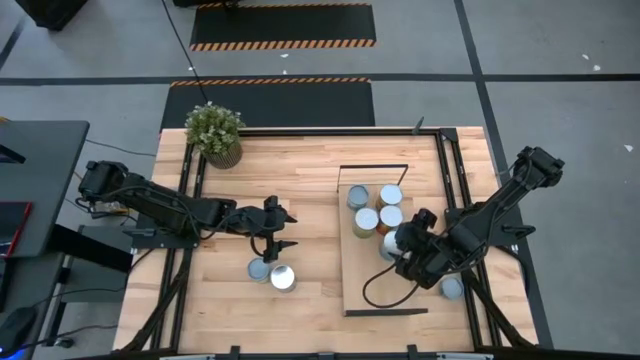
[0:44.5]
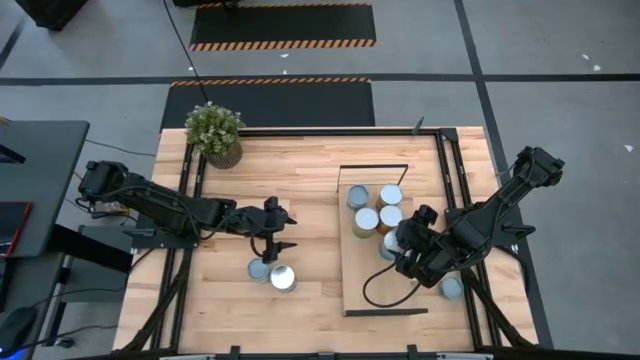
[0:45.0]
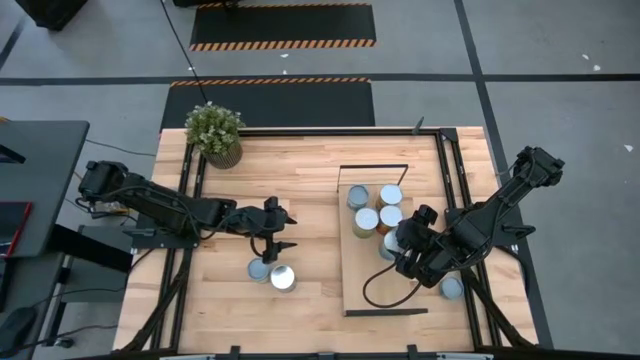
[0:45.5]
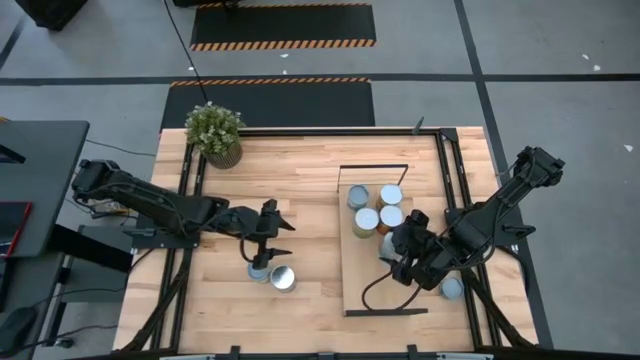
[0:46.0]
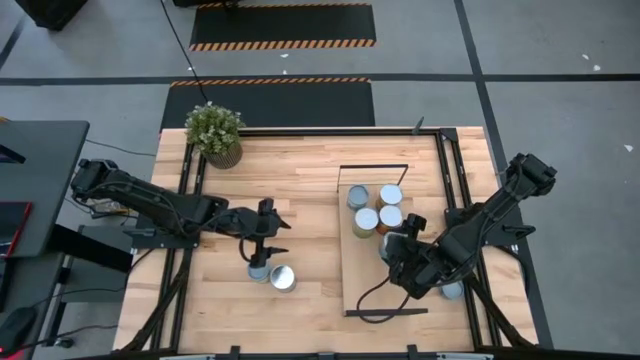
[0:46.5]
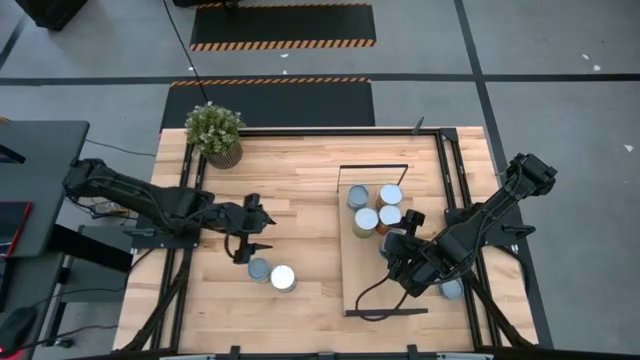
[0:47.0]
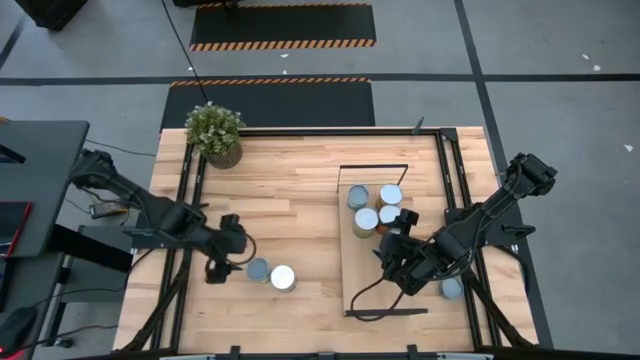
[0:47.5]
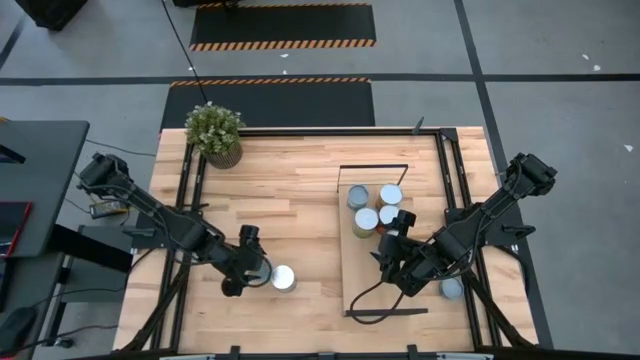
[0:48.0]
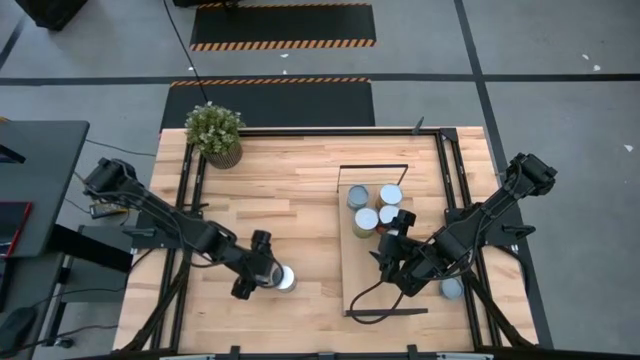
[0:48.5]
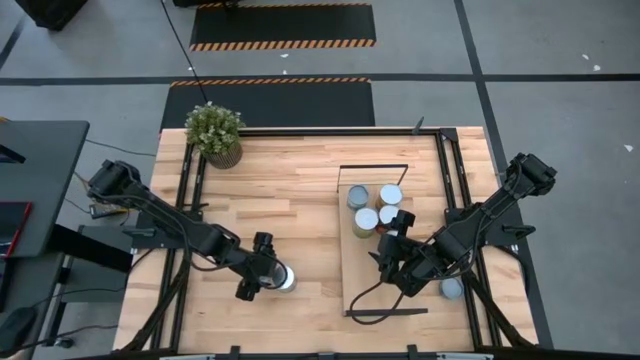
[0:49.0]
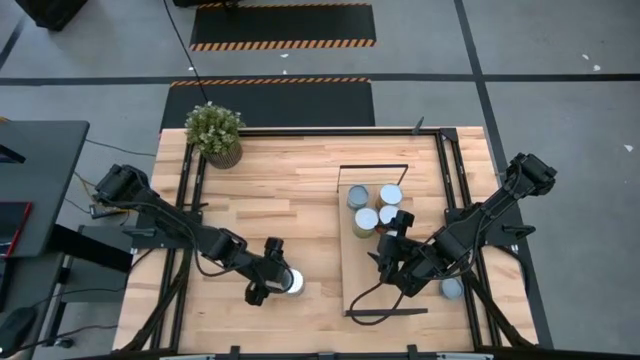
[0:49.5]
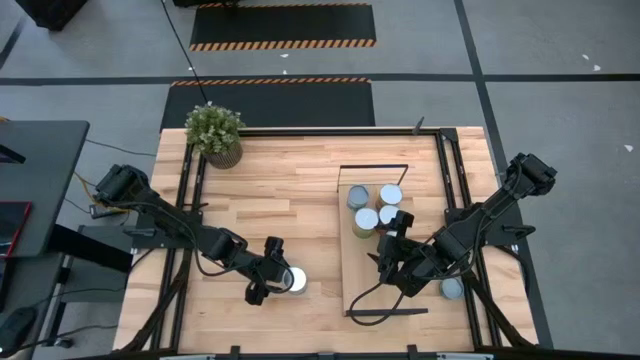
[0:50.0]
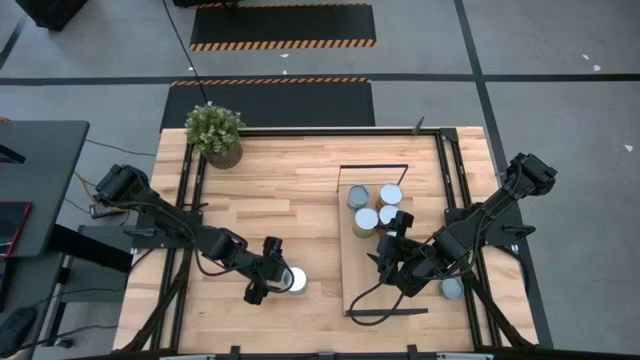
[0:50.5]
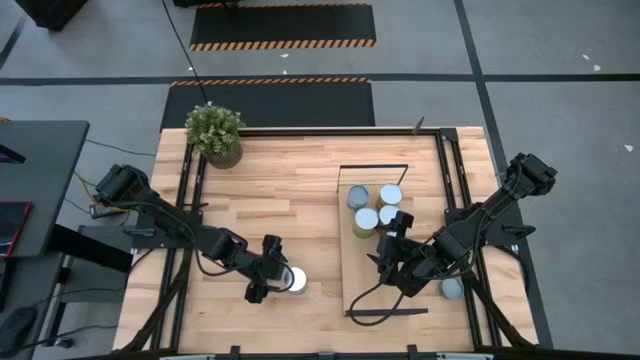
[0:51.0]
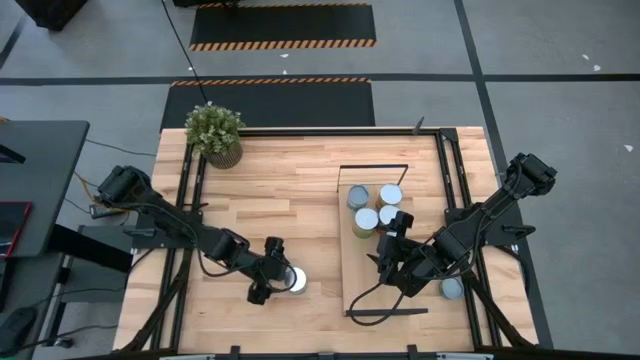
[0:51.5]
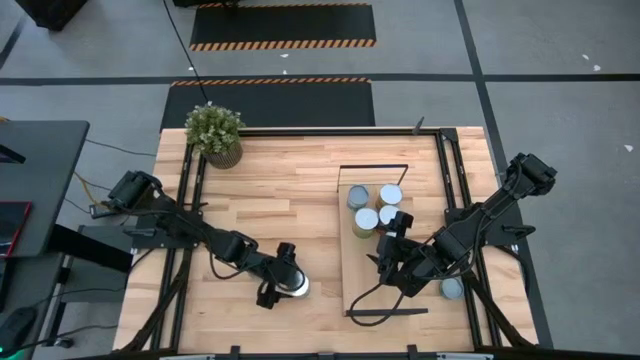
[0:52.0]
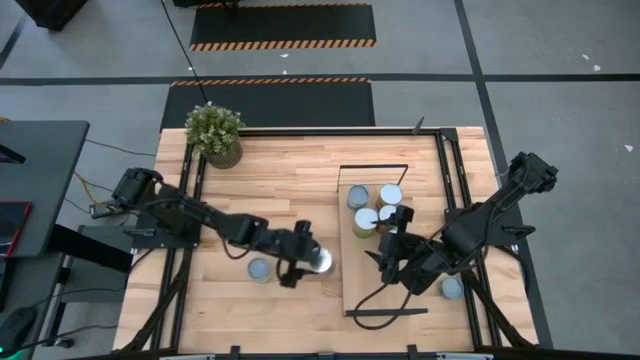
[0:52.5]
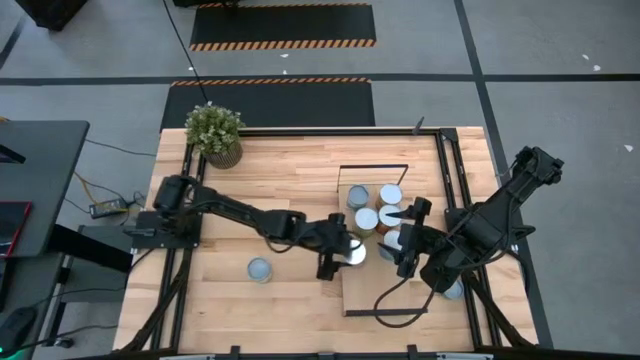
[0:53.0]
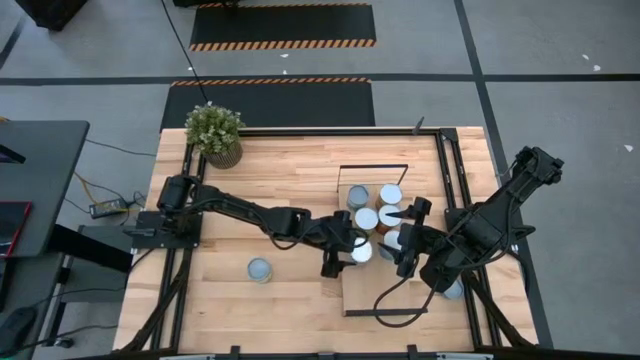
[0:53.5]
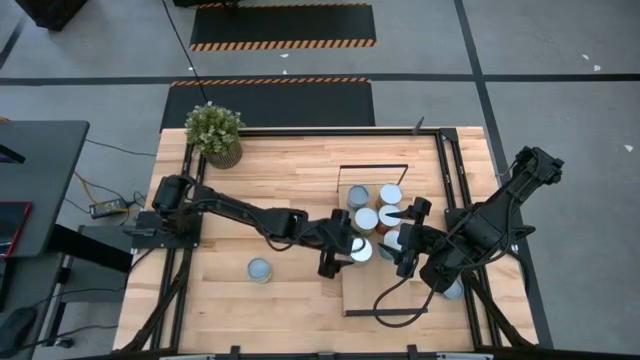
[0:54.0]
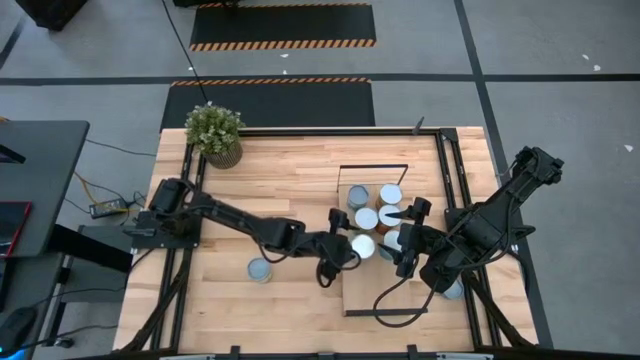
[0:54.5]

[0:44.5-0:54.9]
Task: Pick and place cans onto a shelf
Put the canned peaches can on the shelf

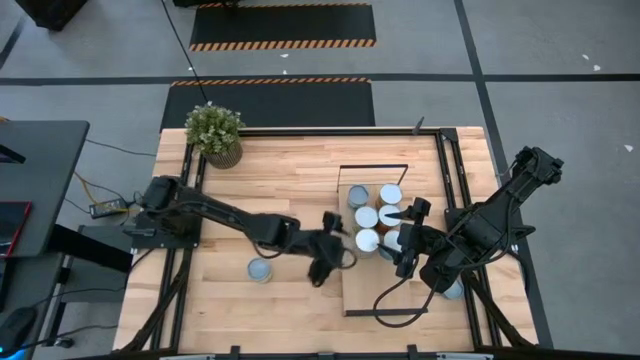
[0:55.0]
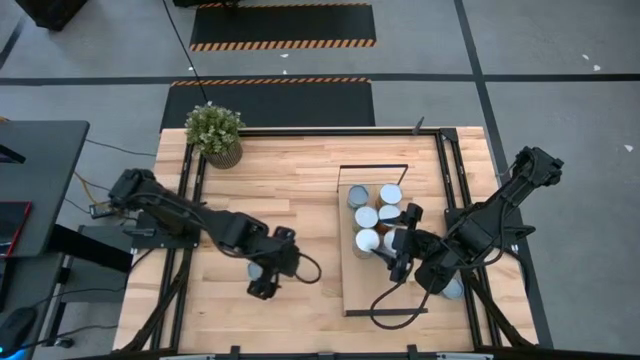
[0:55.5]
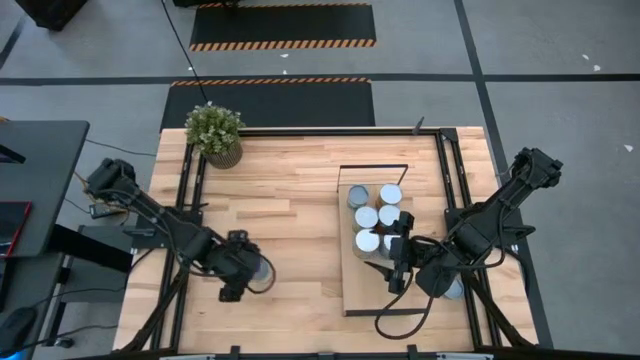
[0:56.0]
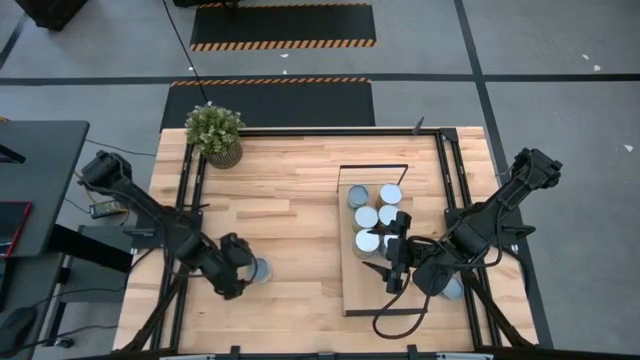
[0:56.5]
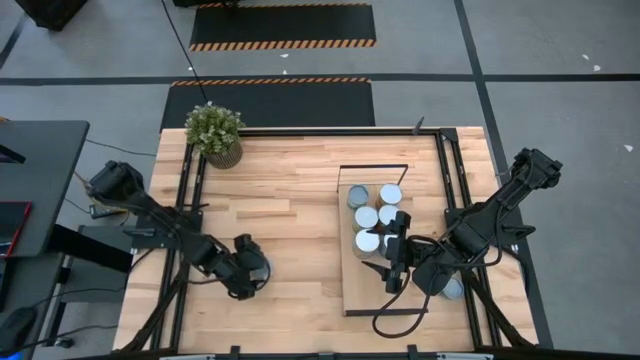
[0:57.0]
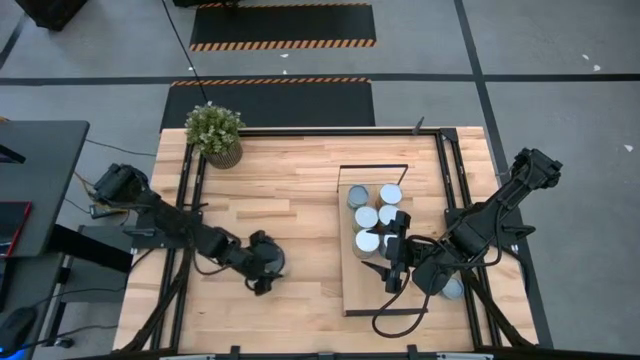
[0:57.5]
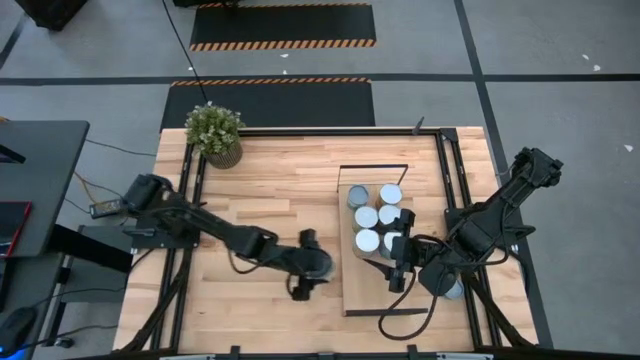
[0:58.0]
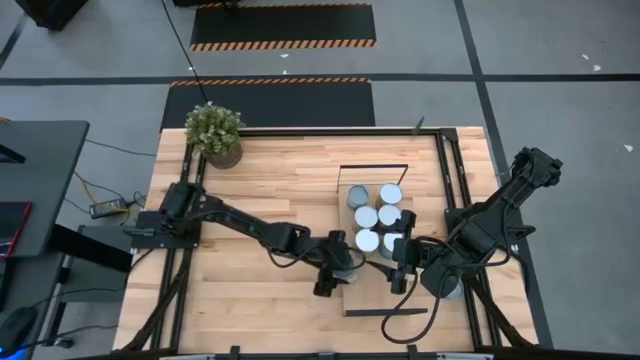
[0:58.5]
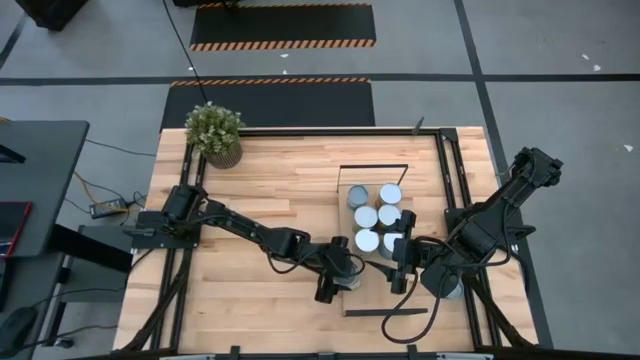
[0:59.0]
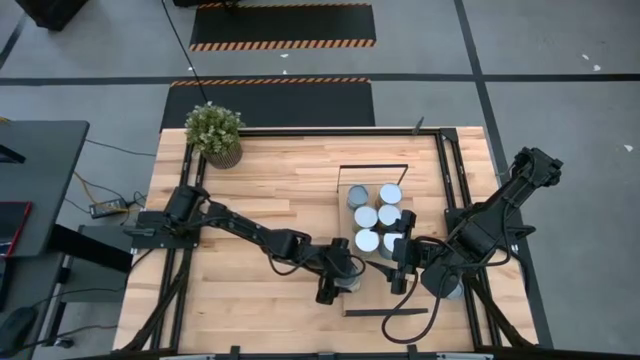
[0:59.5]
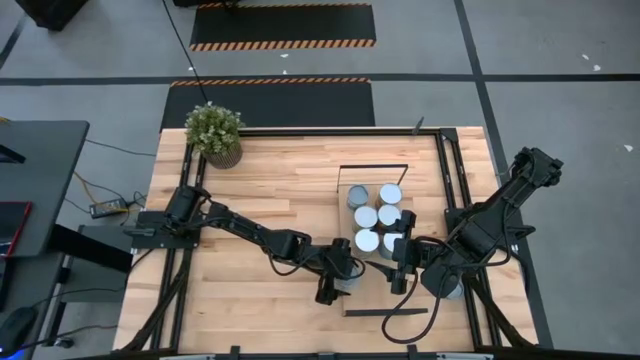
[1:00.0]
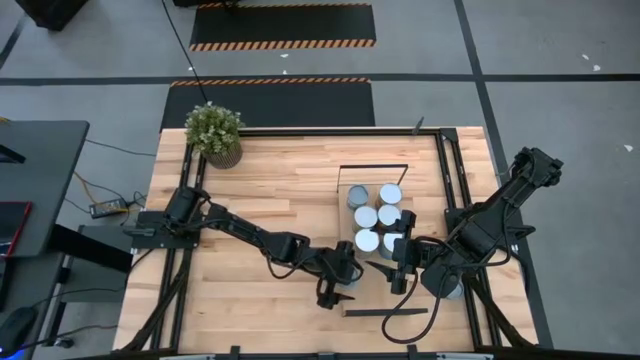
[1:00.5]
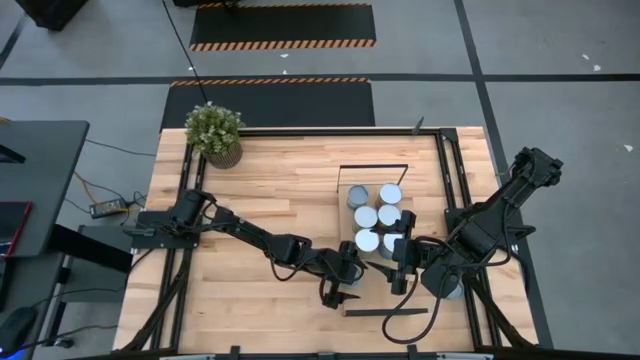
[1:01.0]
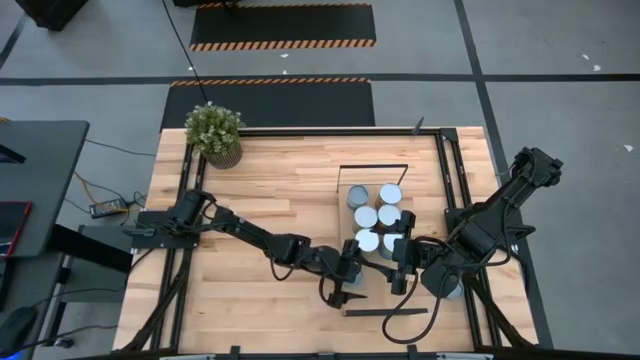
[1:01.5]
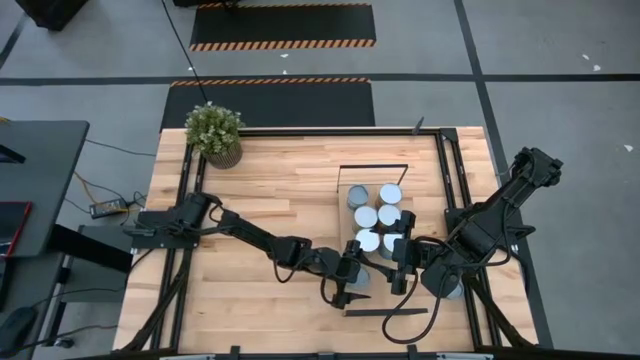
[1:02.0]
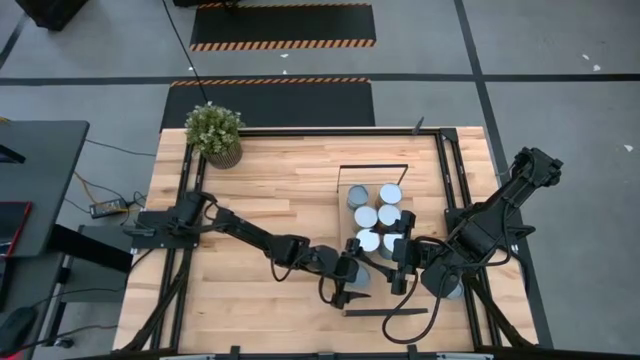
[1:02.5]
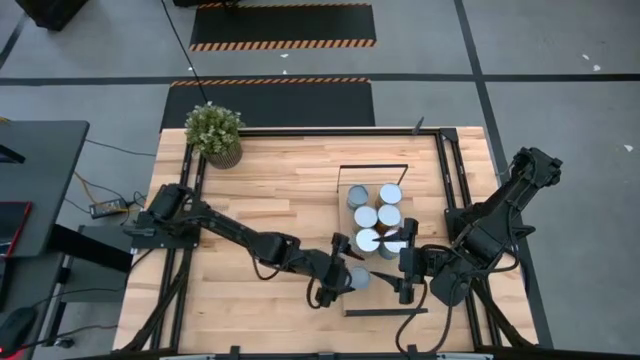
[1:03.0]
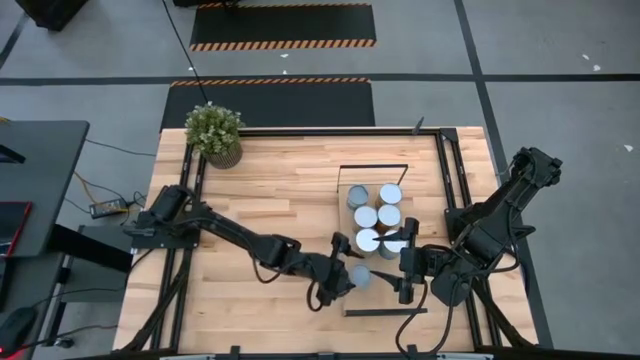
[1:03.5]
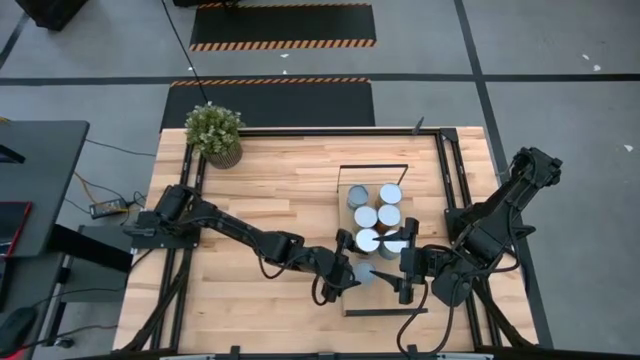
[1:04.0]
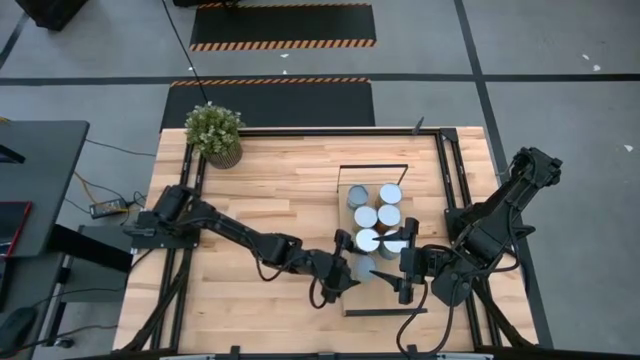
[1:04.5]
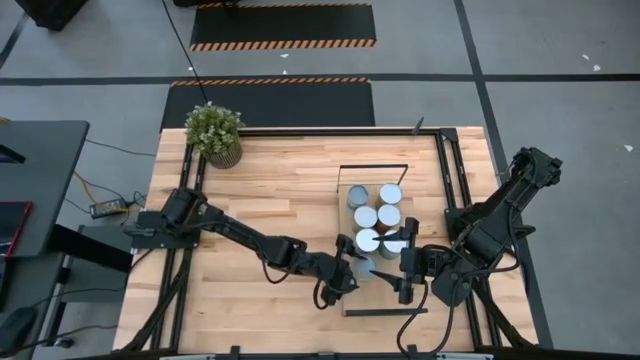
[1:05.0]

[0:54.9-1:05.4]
Put the canned chicken soup can on the shelf

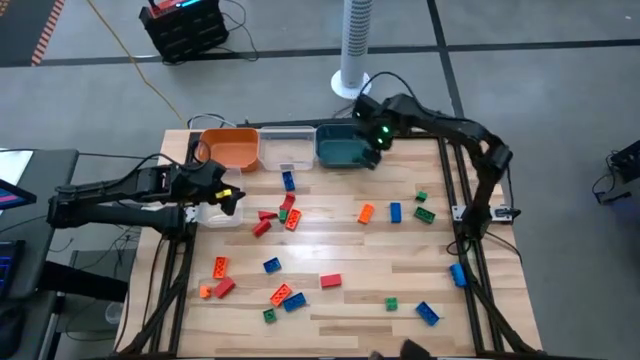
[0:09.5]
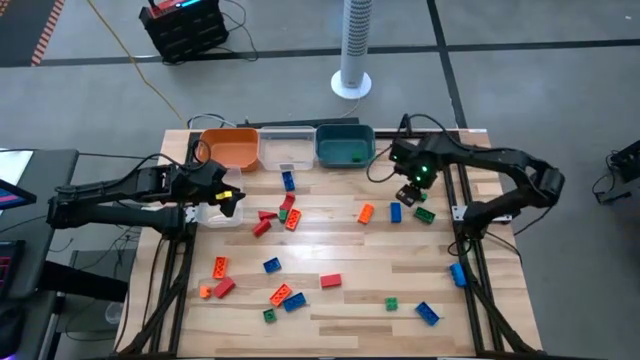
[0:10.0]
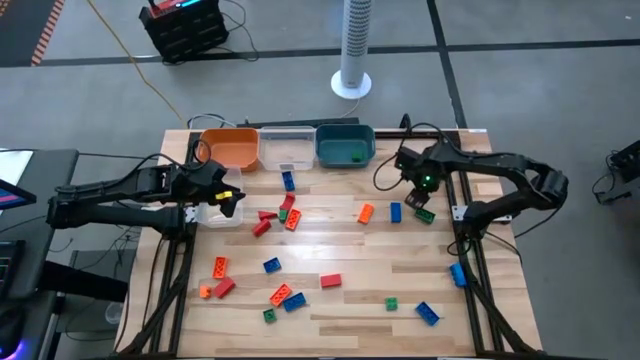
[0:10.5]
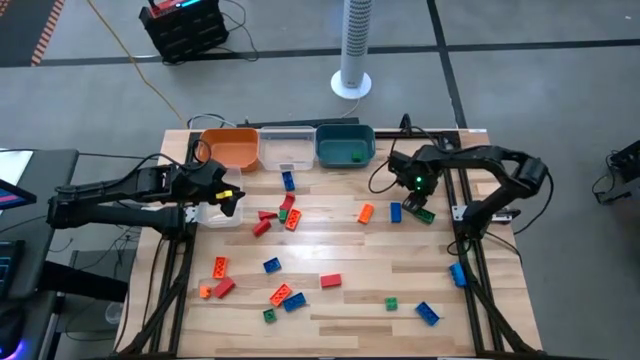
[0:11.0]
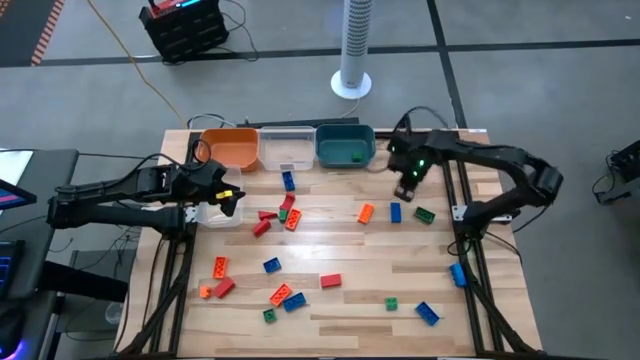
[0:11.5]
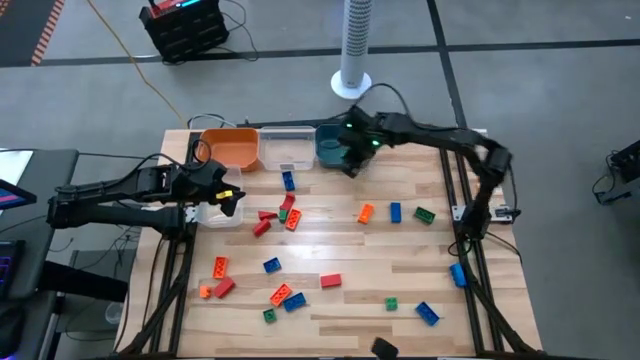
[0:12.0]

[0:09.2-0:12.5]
Task: Sort blocks
Put the green game piece into the blue bin
